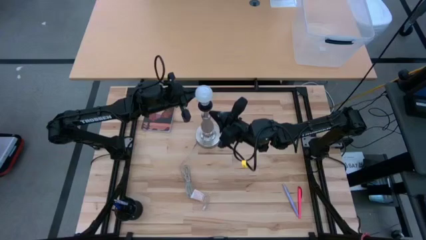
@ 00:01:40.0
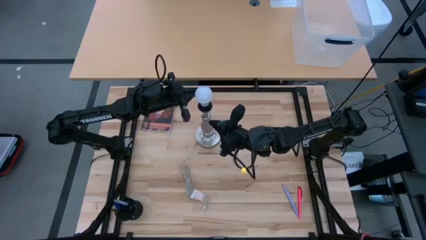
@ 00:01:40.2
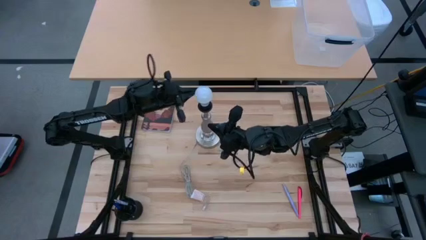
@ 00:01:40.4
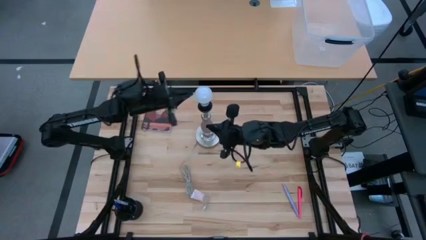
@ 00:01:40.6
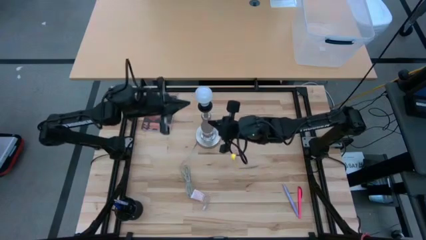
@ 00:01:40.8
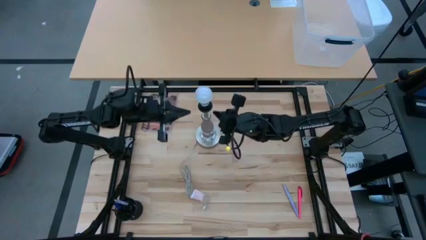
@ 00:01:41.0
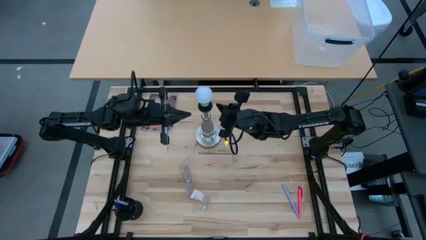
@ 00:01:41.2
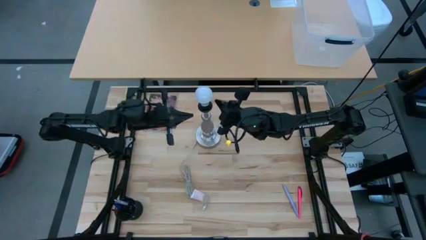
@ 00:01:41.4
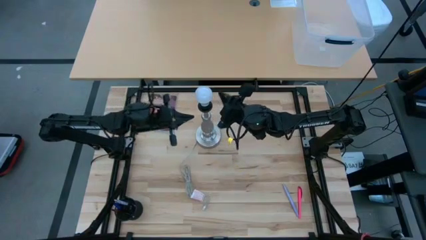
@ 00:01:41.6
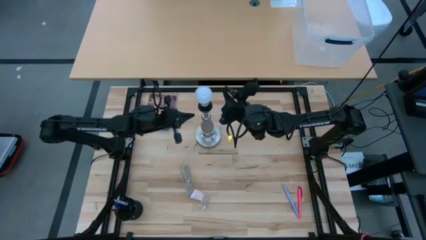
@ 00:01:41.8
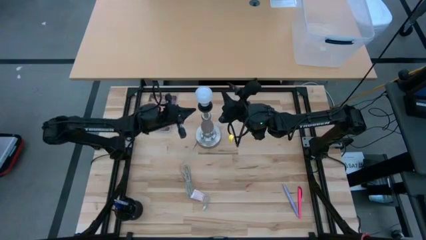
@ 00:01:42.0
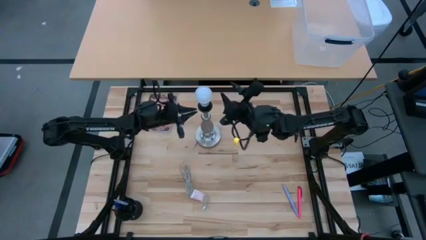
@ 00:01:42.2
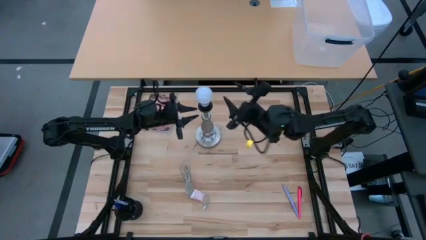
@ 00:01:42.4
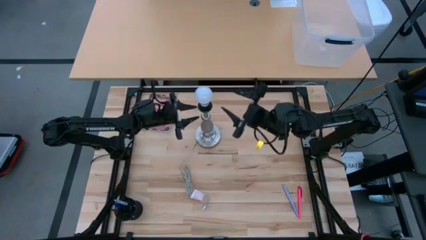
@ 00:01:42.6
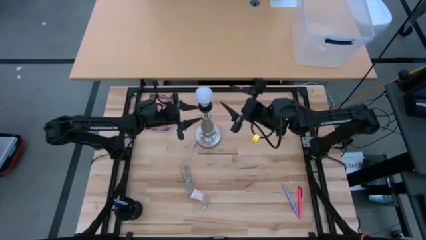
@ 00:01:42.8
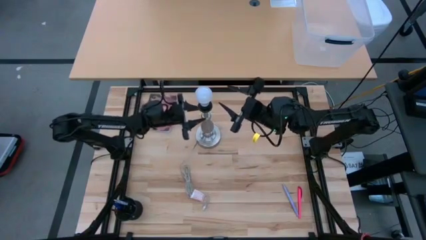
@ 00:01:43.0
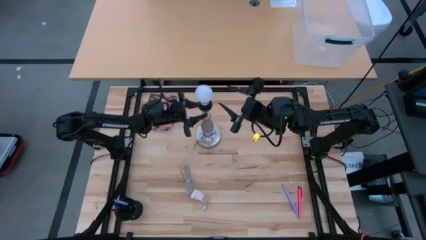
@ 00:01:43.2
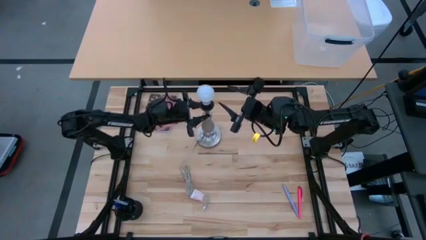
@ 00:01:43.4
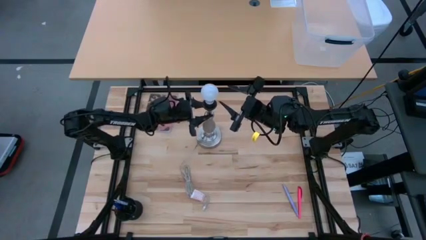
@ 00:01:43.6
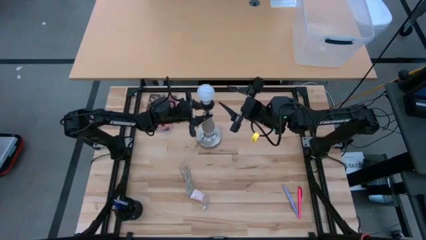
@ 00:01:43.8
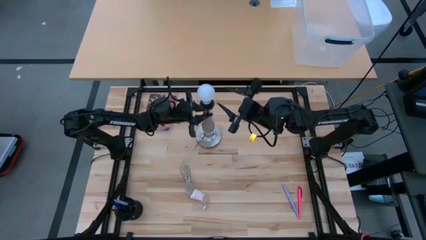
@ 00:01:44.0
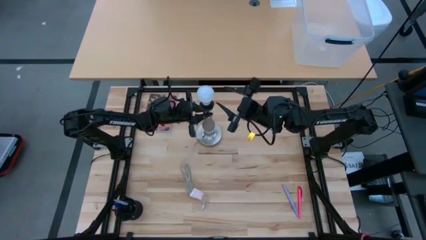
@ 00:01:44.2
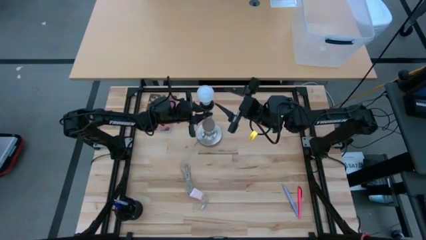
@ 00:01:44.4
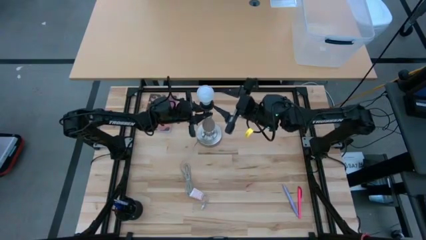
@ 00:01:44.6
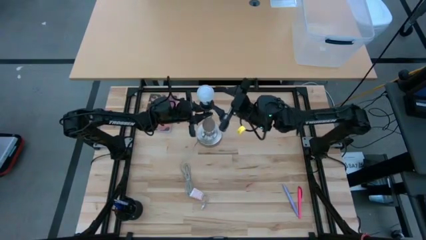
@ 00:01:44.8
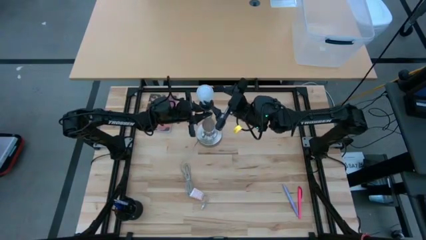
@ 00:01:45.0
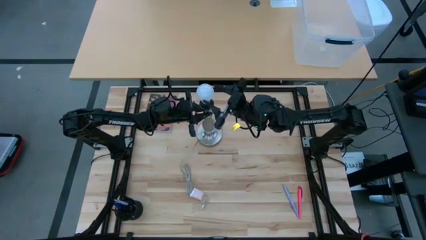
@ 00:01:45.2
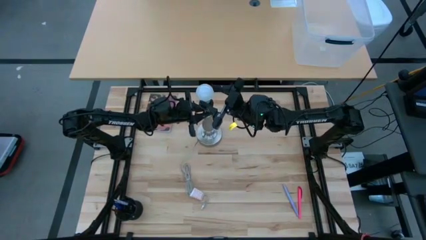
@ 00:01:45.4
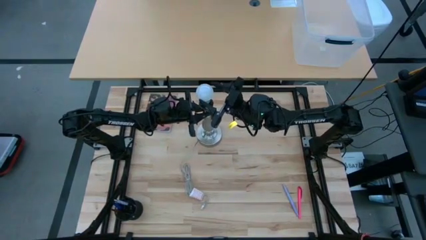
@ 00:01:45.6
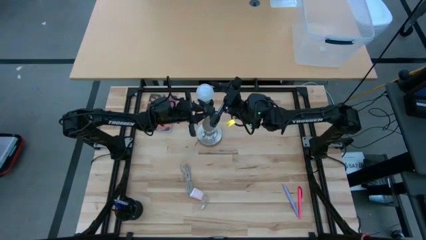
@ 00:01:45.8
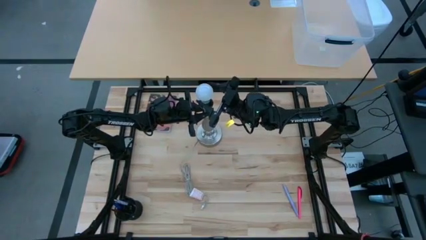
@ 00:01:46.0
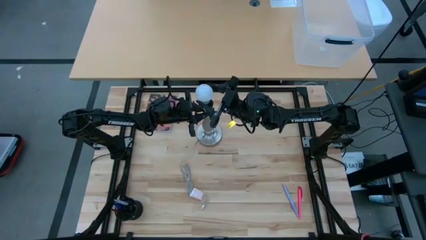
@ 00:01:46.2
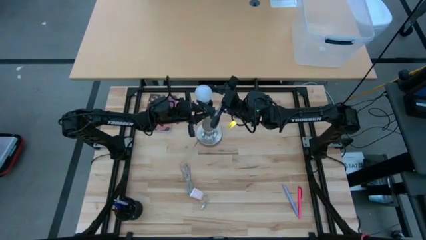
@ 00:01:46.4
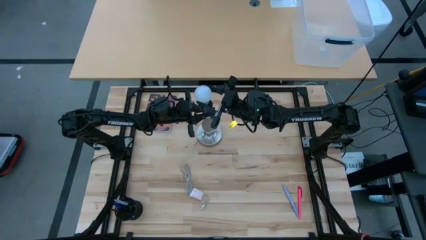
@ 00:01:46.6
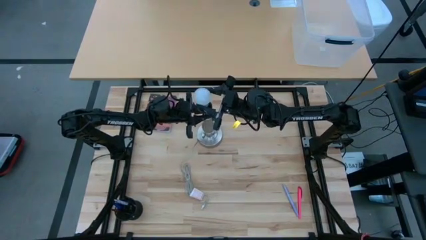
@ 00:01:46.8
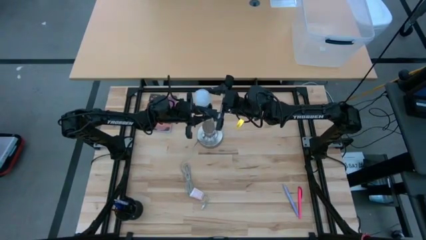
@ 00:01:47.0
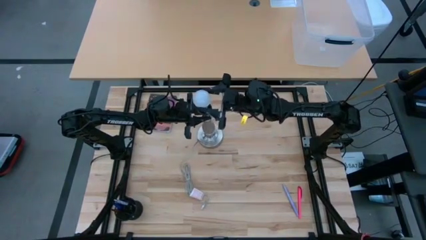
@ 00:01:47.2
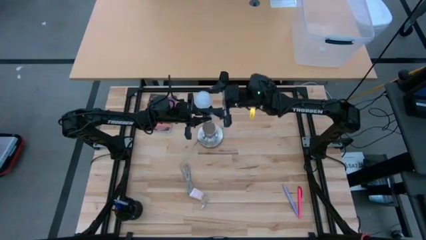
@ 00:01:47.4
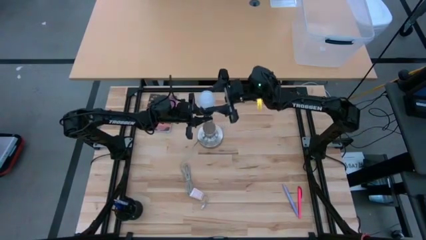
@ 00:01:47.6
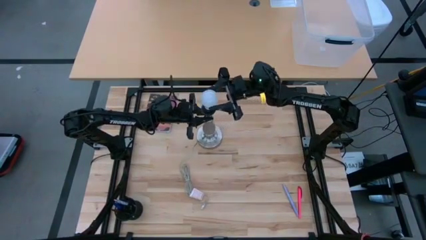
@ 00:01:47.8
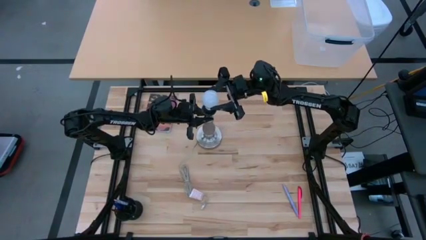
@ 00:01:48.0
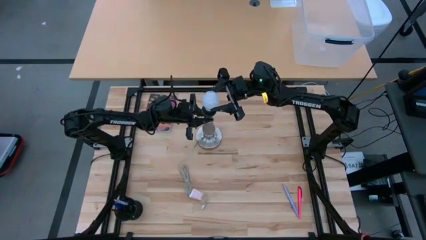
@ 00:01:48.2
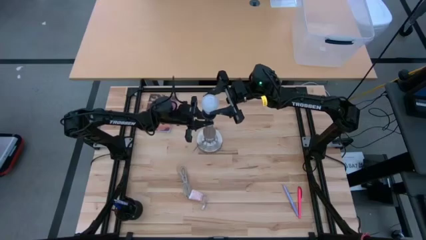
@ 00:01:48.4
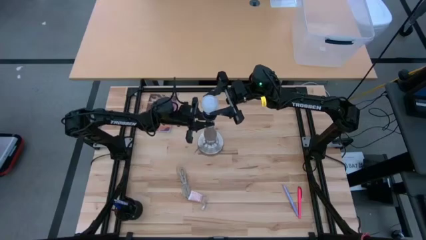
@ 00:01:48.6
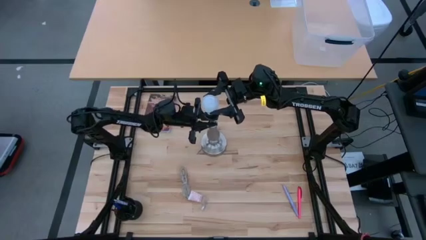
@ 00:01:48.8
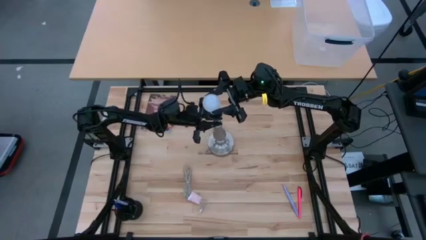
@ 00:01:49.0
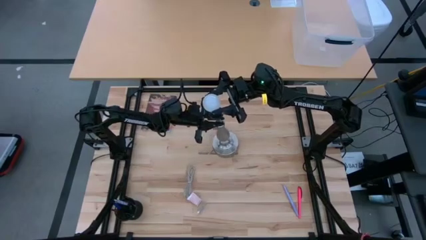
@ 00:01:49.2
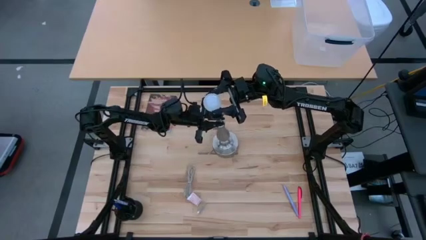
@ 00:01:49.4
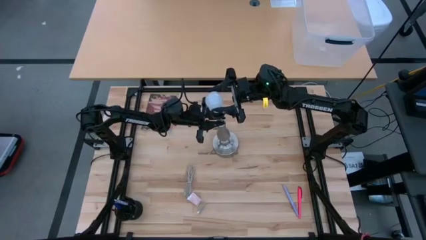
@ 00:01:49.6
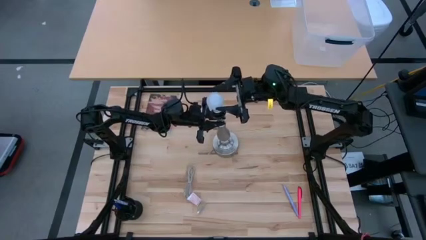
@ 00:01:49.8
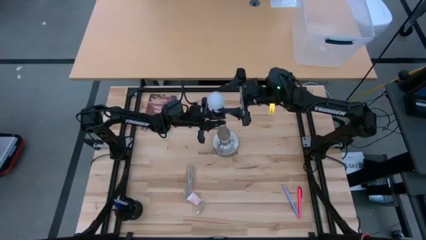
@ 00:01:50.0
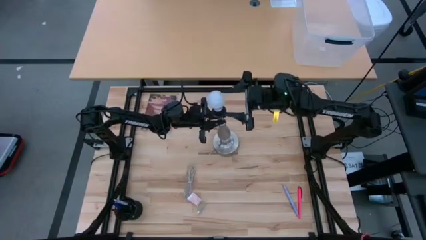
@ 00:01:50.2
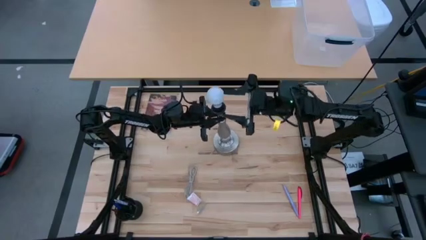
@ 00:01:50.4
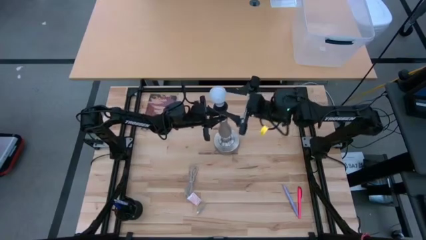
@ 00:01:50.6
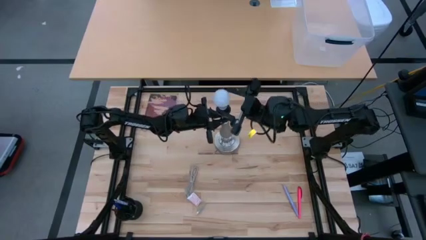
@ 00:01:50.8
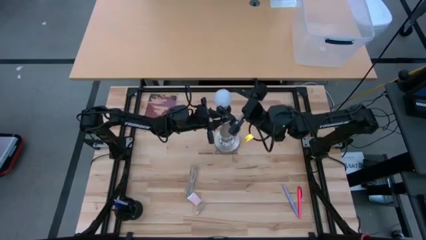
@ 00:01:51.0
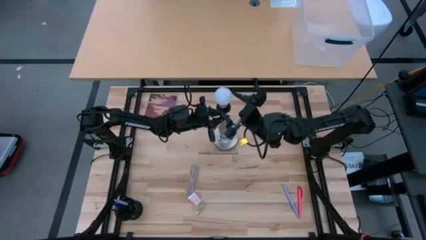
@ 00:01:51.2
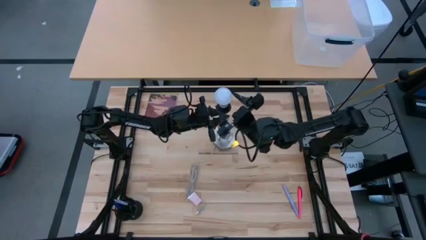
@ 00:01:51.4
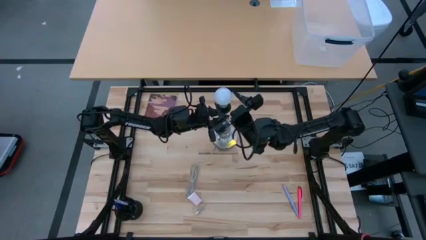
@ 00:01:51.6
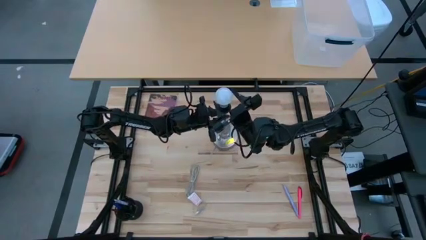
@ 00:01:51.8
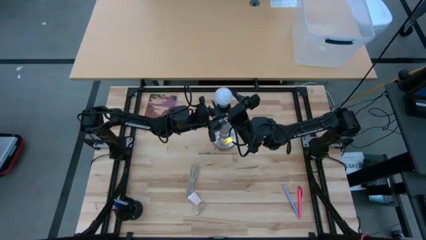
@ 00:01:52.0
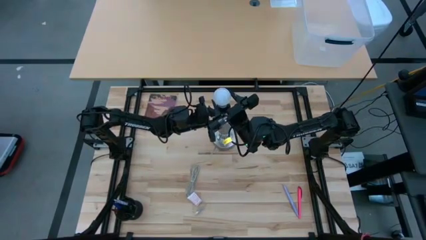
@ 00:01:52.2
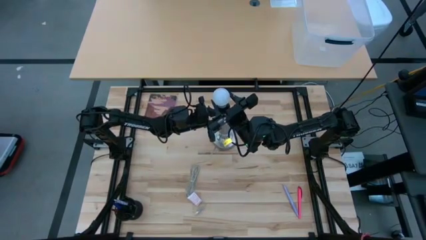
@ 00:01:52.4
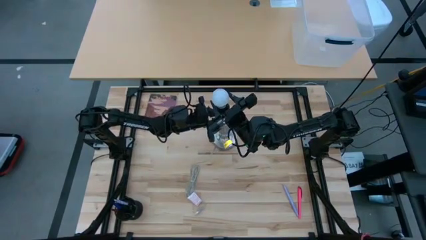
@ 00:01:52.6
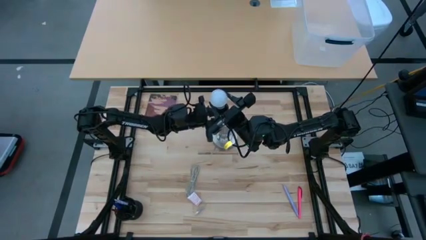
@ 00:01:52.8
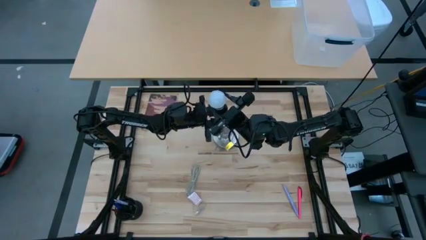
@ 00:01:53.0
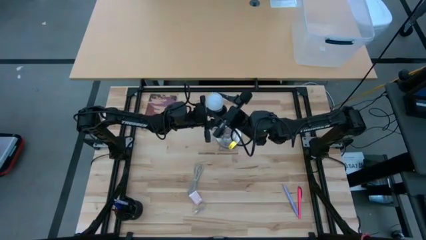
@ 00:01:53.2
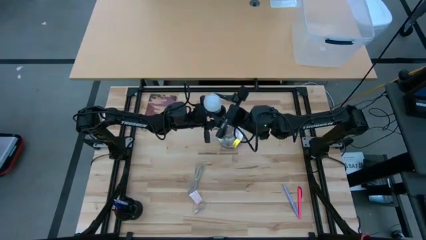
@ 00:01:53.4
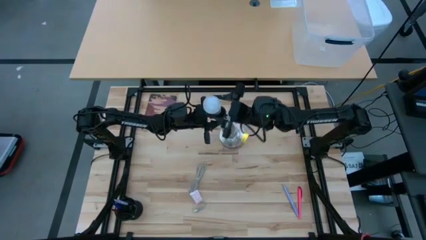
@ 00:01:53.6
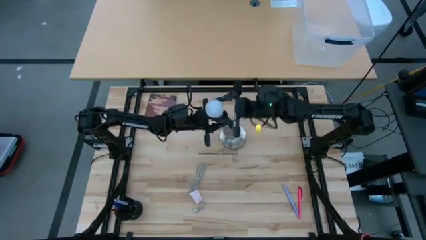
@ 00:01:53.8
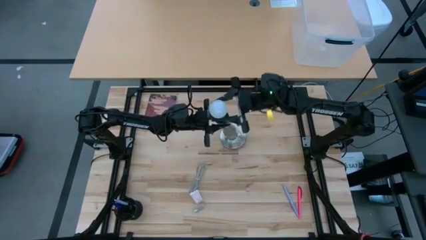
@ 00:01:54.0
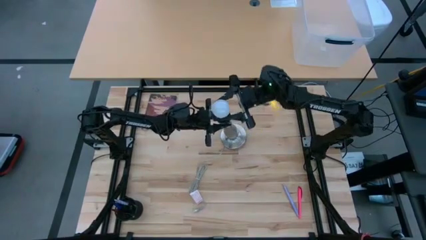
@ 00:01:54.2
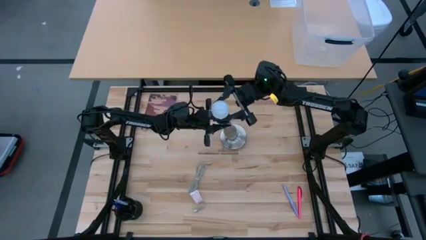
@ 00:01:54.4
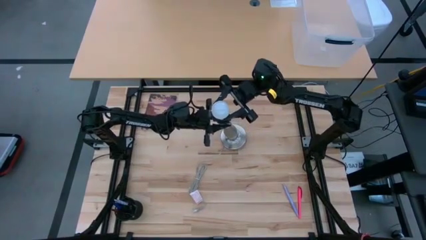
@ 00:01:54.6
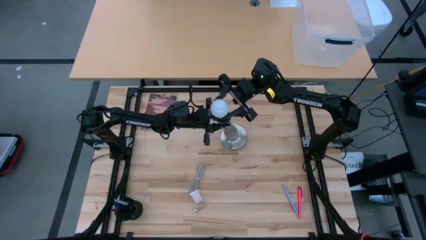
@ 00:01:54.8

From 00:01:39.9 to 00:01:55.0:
Task: Screw lightbulb
Remove the lightbulb from the silver lamp and put it on the table
